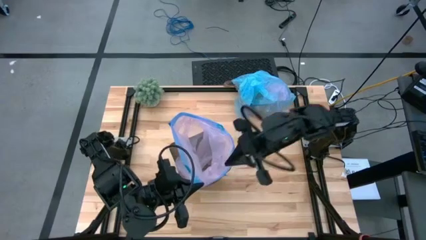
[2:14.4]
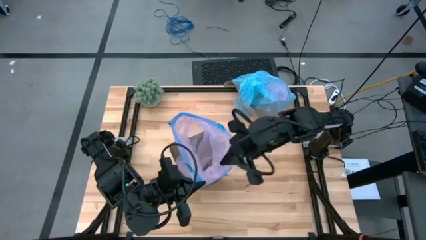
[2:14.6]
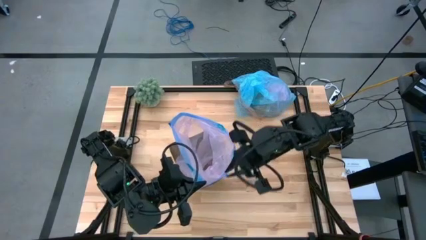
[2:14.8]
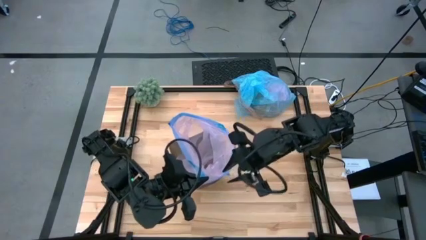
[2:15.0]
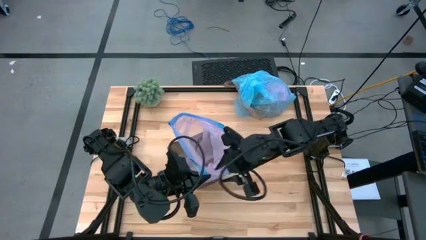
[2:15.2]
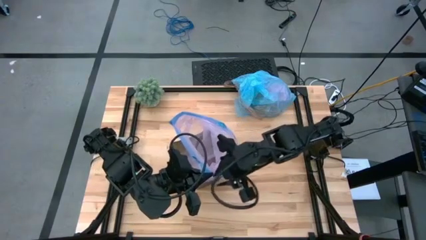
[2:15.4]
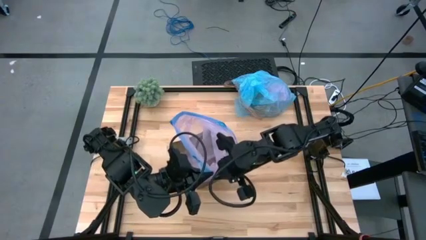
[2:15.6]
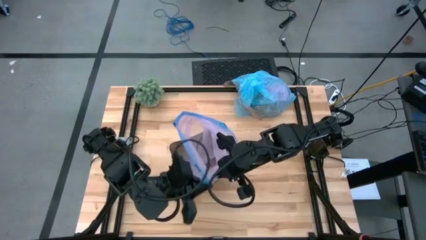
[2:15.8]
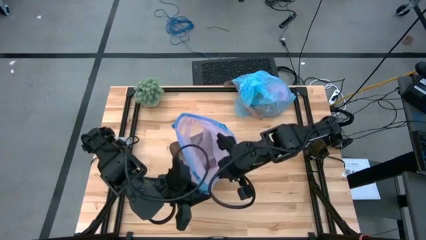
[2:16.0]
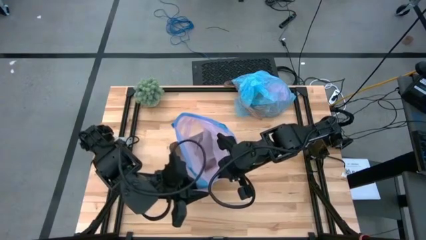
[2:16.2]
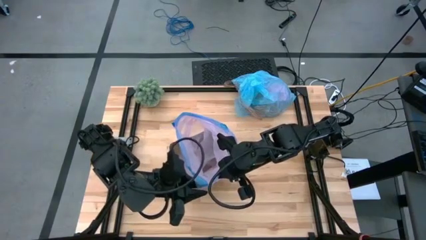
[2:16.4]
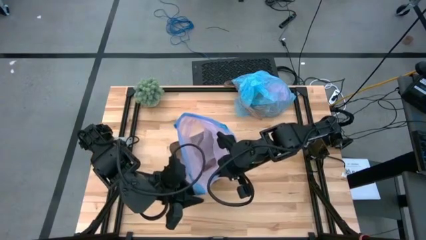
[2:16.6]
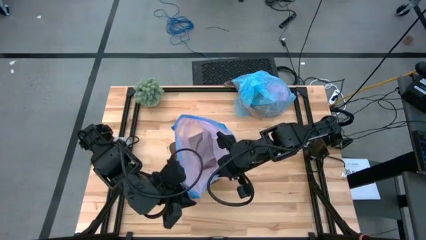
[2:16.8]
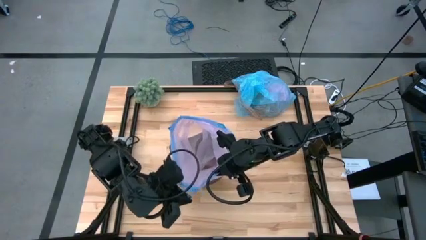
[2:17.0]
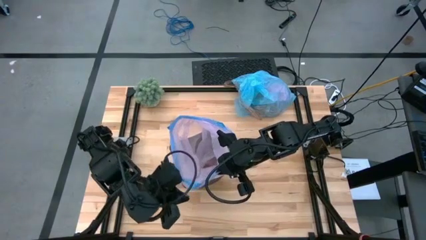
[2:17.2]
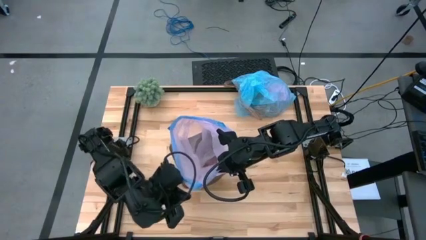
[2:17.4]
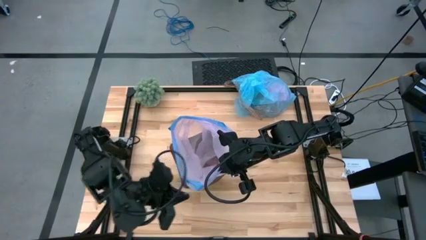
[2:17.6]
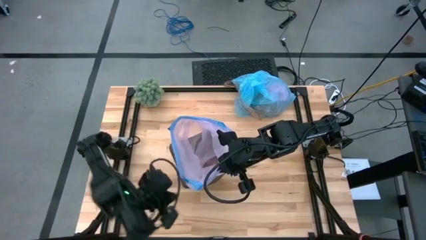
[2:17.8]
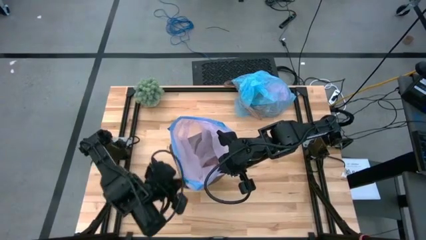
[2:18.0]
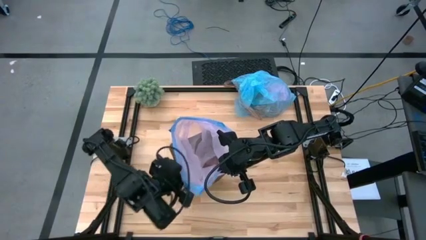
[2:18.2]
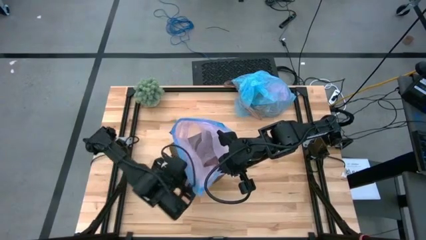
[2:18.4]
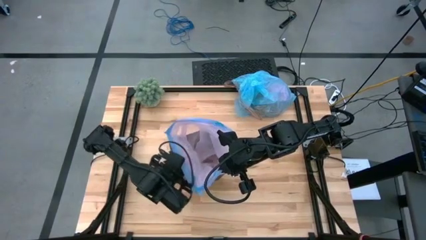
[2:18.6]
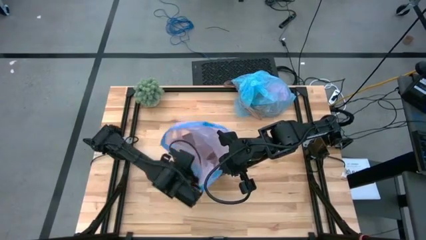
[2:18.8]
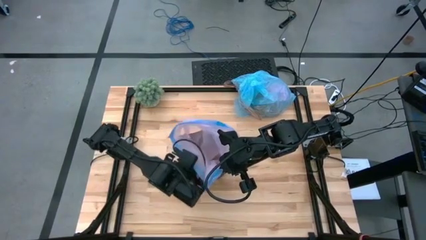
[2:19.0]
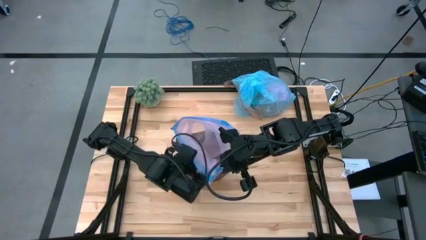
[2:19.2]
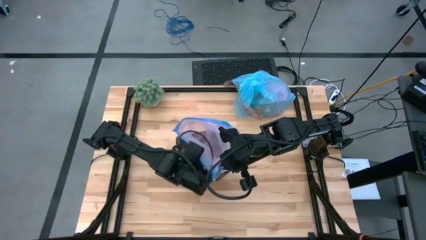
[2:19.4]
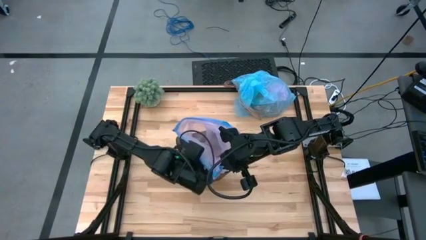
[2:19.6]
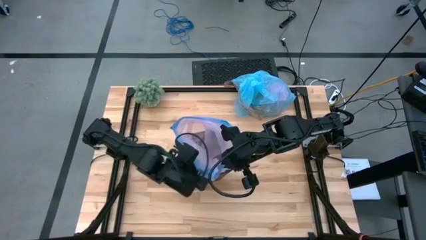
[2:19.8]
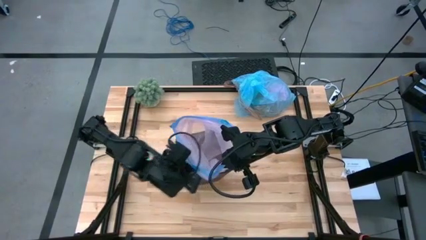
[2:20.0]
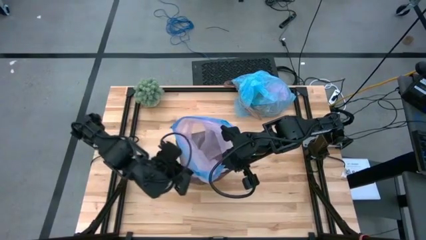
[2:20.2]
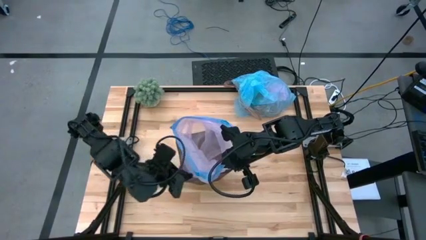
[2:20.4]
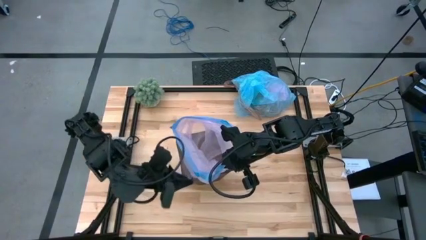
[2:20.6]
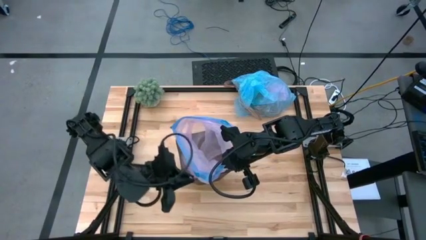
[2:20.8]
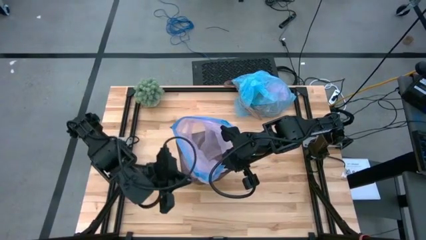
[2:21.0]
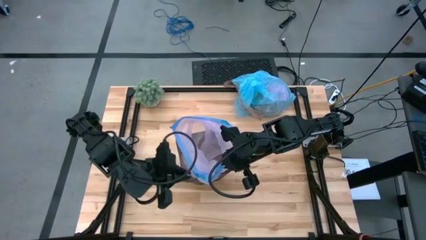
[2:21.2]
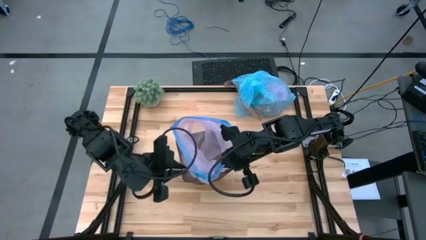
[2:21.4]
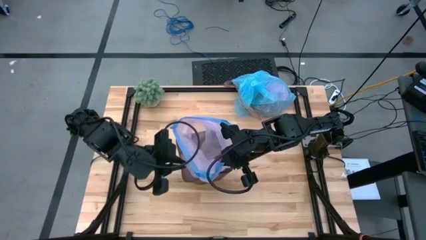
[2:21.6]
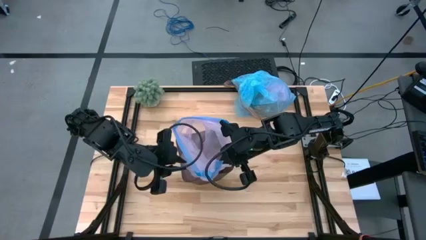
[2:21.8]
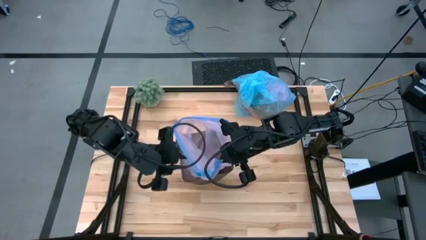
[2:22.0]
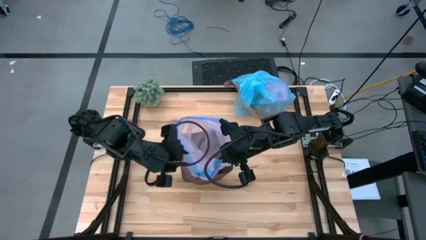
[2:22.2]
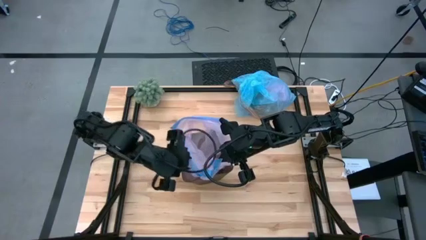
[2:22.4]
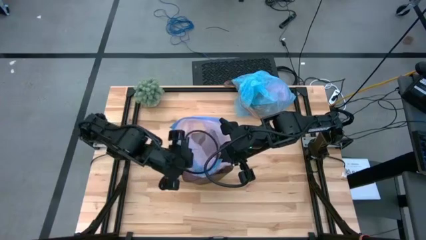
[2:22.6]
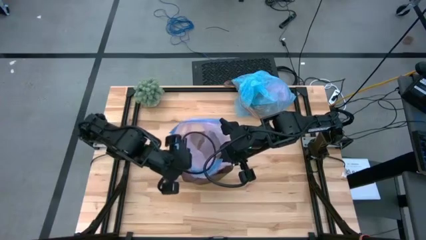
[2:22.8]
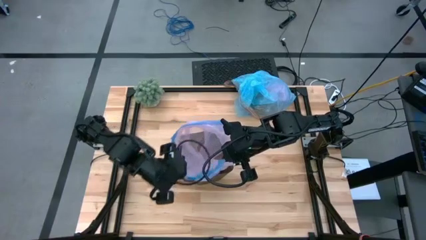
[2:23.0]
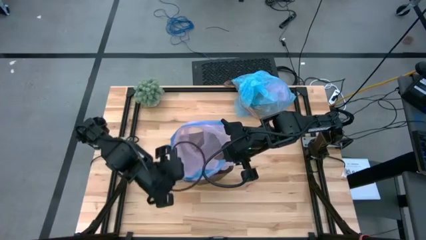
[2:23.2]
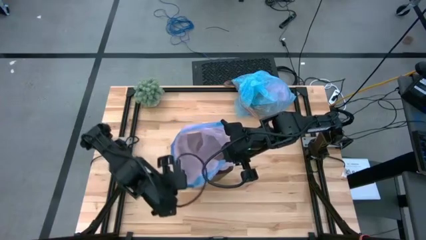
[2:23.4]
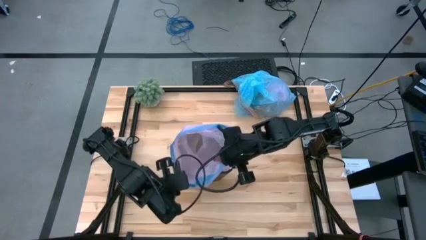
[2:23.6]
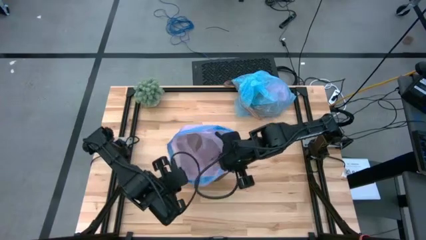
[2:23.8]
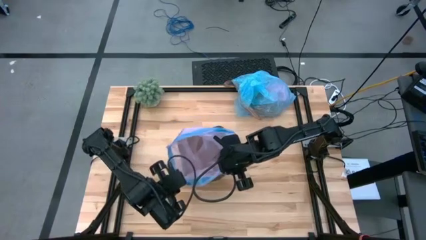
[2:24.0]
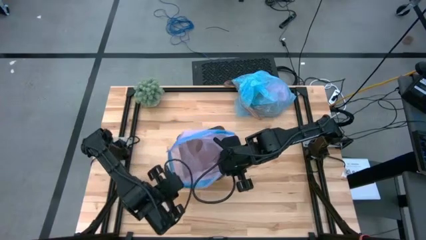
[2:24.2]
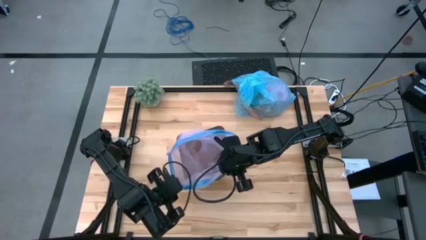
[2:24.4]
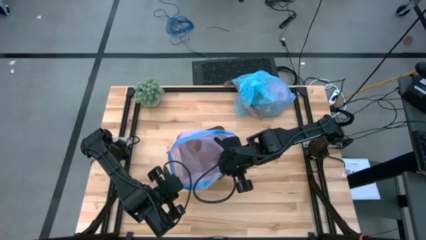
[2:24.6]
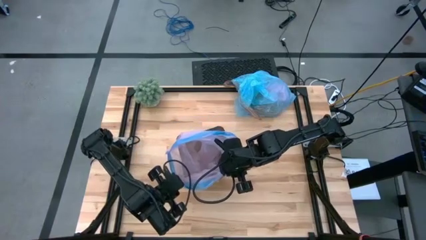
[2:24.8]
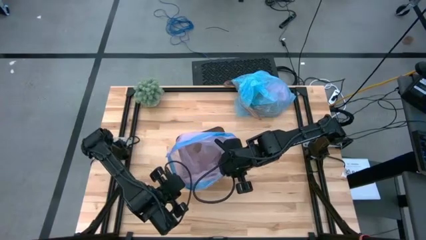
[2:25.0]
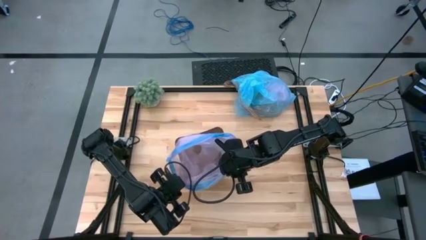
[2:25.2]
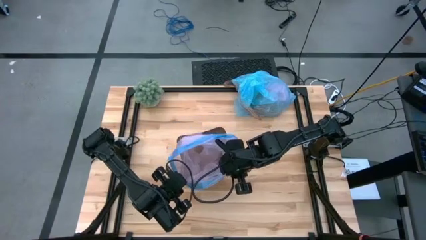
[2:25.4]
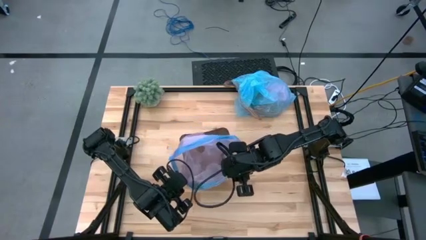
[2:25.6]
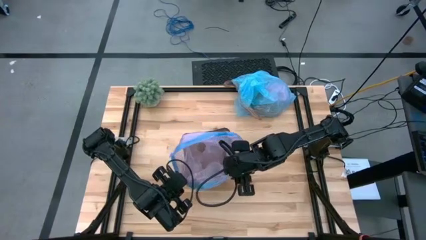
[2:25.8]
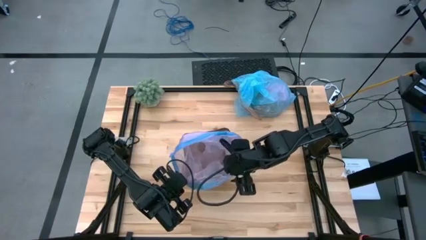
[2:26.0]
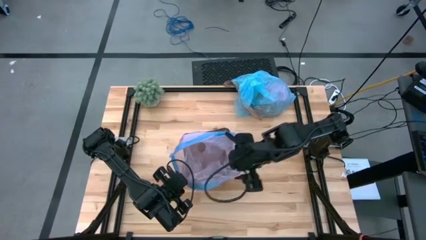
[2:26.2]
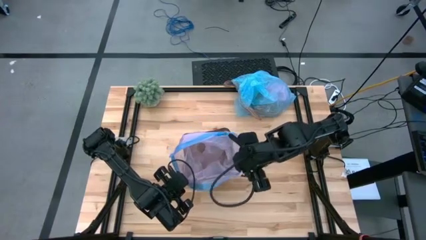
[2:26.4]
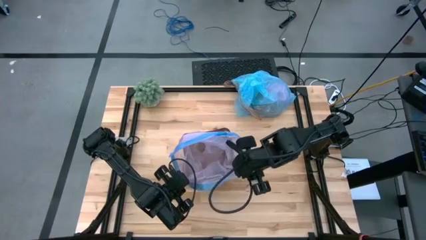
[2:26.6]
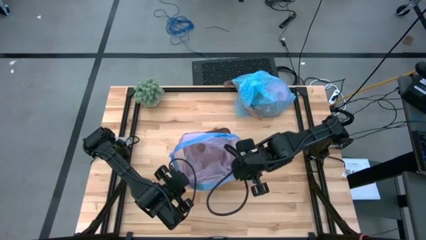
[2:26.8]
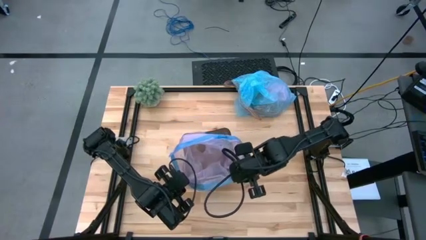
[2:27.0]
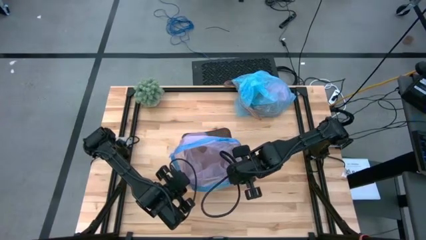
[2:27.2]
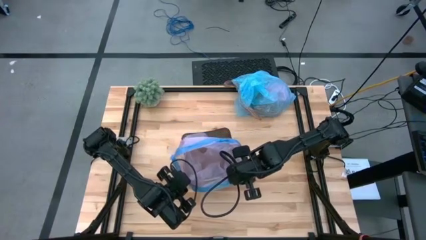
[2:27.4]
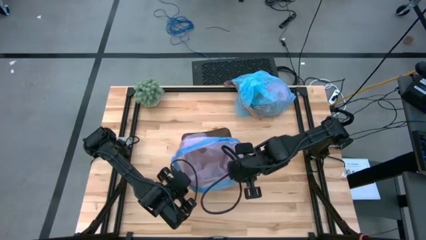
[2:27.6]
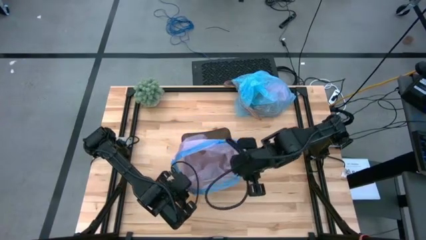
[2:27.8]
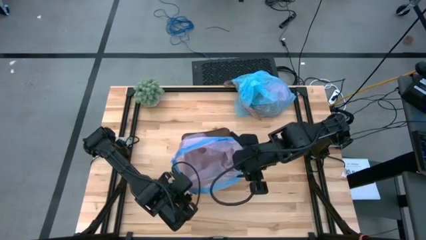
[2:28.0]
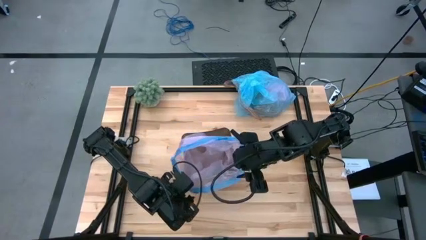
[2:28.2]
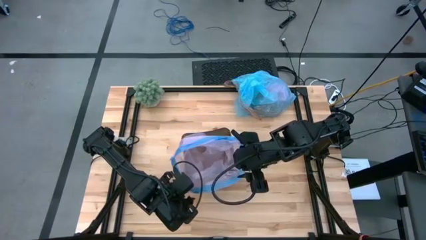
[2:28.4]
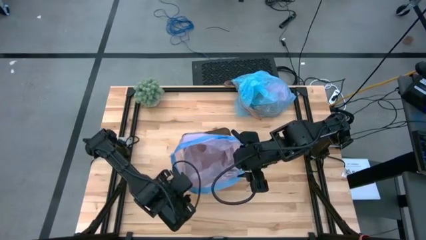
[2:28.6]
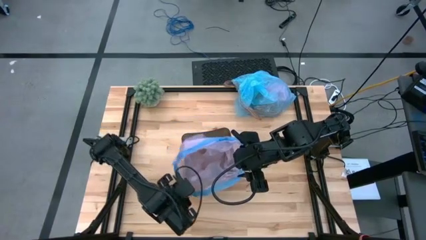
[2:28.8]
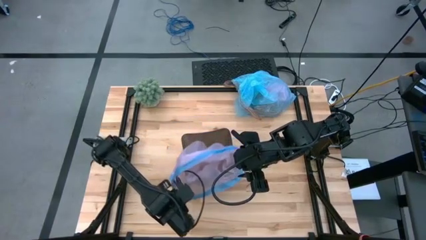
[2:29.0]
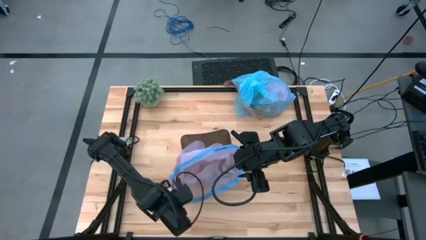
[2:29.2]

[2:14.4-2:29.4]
Task: place trash/remove bag and relplace
Insert the pink trash bag into the trash bin
